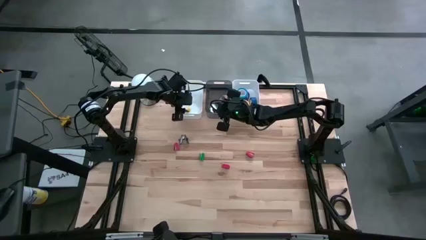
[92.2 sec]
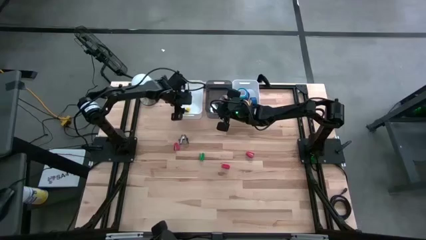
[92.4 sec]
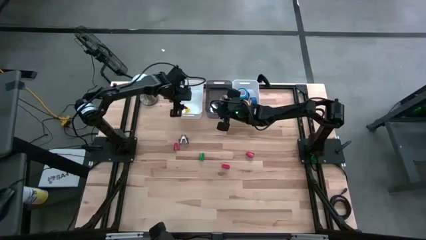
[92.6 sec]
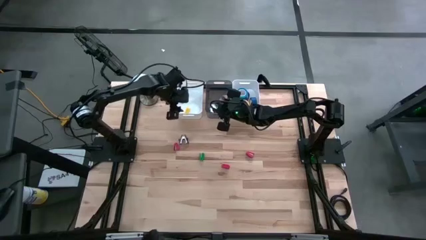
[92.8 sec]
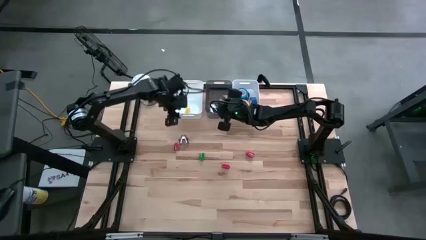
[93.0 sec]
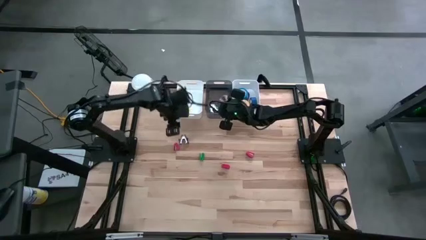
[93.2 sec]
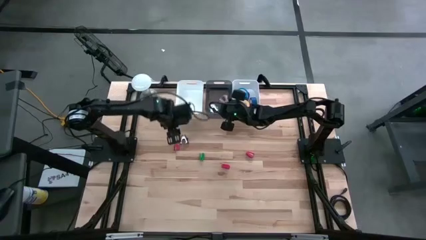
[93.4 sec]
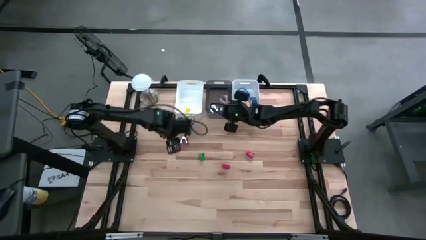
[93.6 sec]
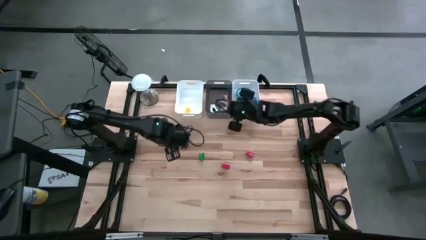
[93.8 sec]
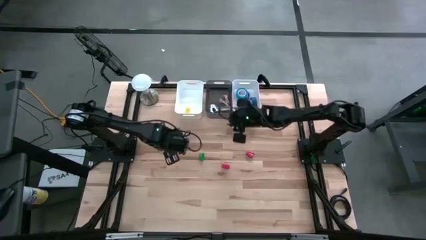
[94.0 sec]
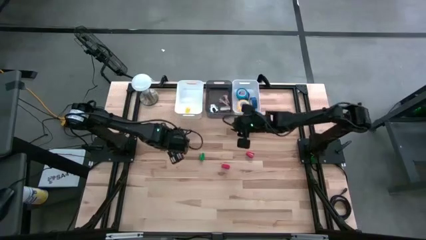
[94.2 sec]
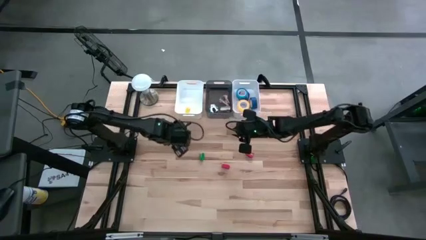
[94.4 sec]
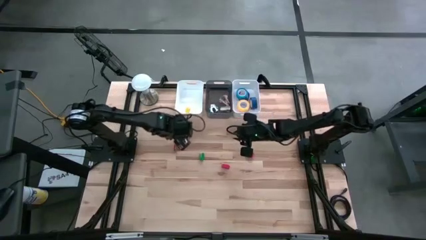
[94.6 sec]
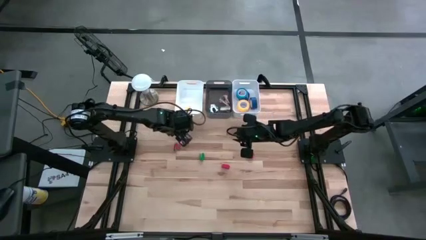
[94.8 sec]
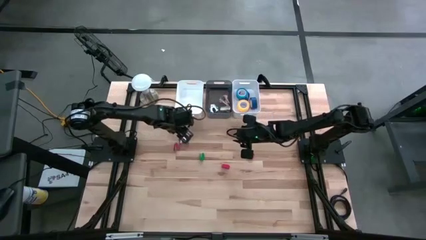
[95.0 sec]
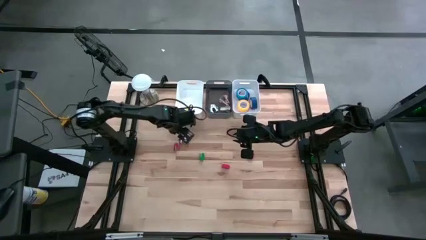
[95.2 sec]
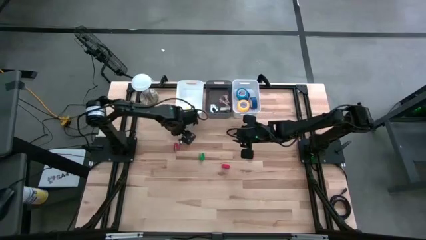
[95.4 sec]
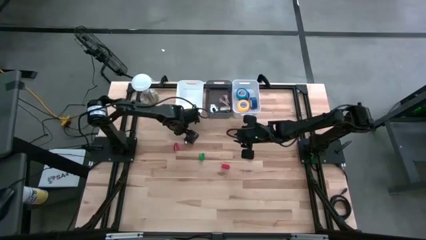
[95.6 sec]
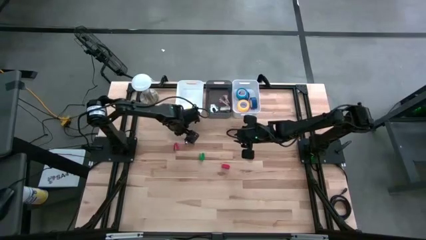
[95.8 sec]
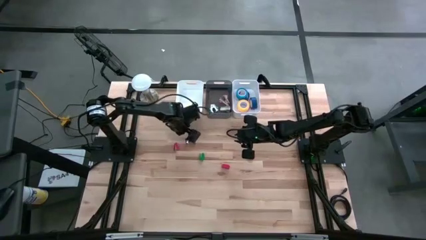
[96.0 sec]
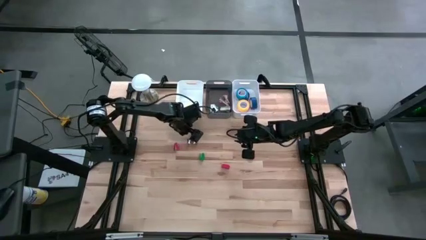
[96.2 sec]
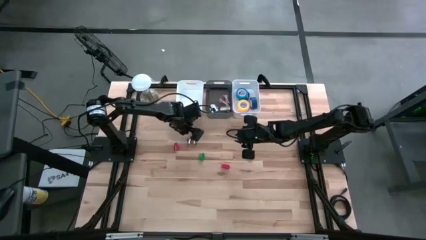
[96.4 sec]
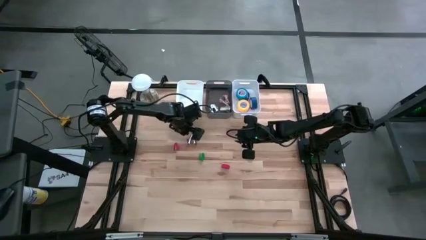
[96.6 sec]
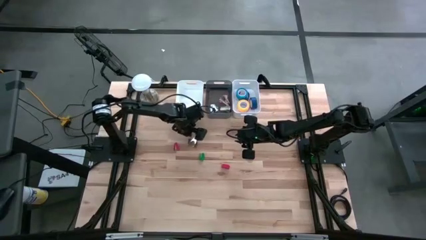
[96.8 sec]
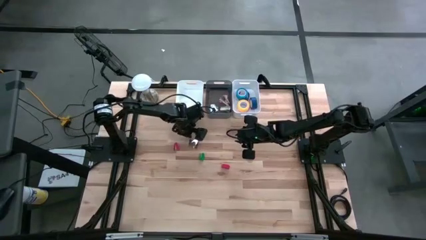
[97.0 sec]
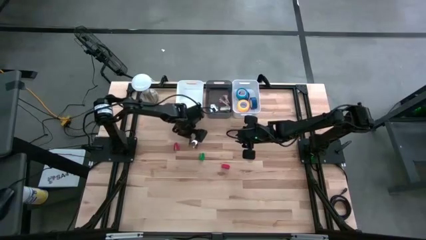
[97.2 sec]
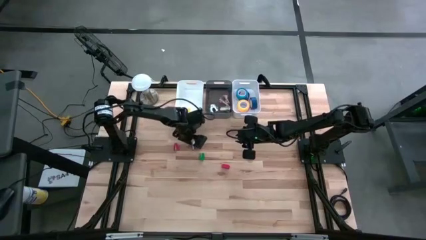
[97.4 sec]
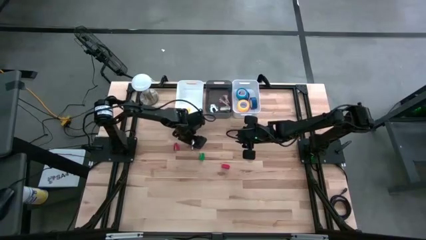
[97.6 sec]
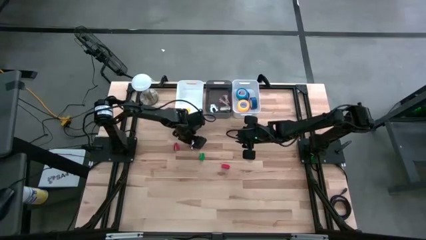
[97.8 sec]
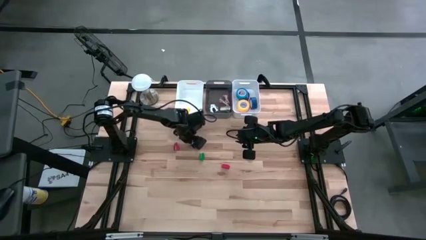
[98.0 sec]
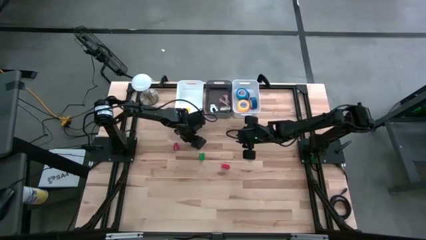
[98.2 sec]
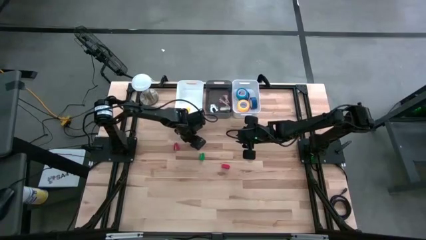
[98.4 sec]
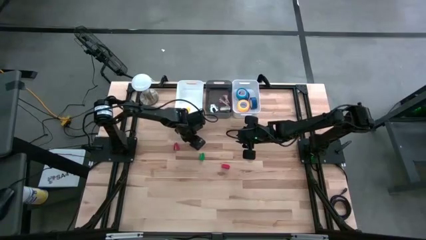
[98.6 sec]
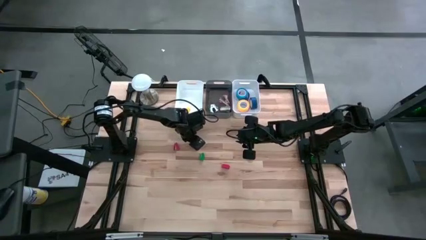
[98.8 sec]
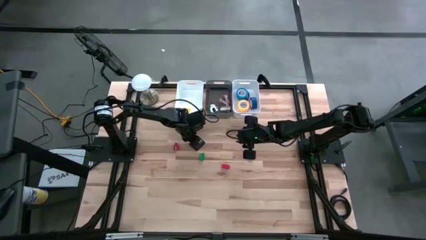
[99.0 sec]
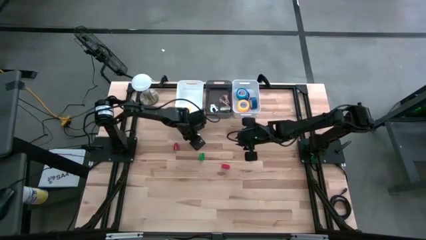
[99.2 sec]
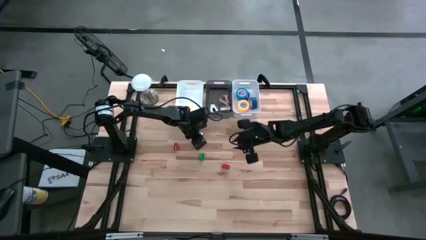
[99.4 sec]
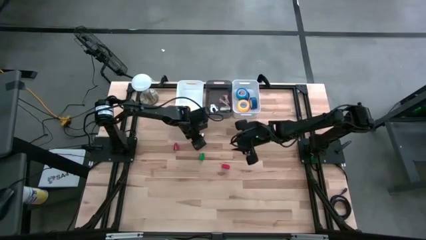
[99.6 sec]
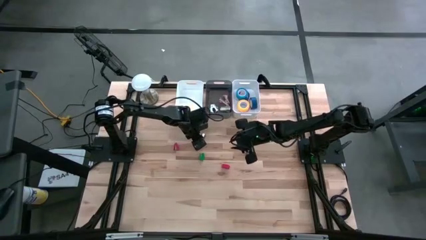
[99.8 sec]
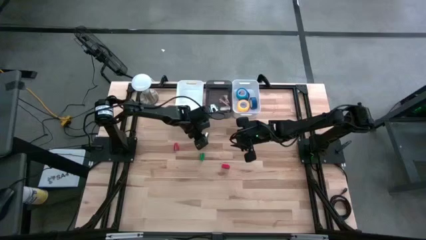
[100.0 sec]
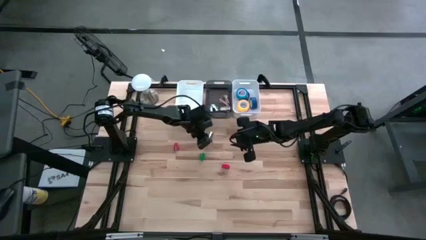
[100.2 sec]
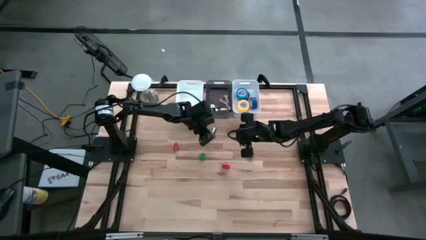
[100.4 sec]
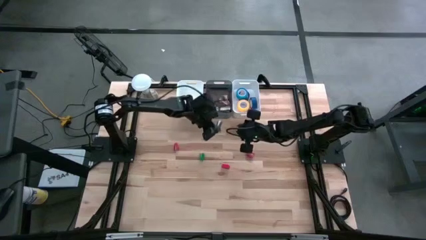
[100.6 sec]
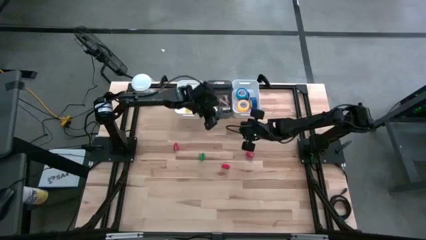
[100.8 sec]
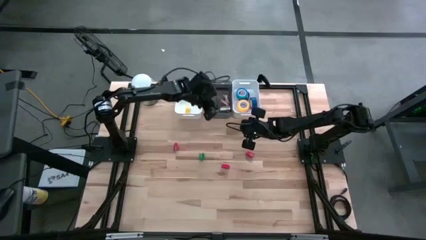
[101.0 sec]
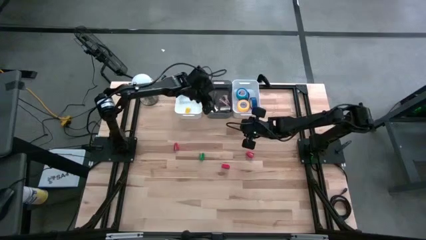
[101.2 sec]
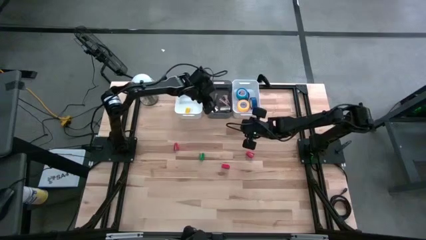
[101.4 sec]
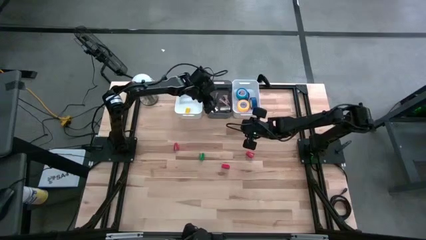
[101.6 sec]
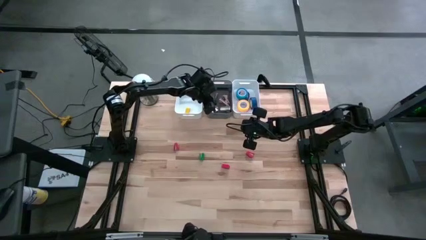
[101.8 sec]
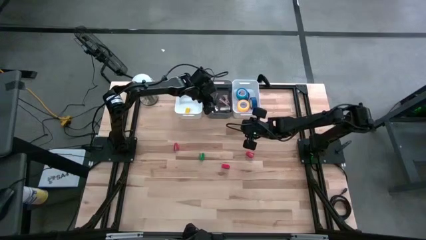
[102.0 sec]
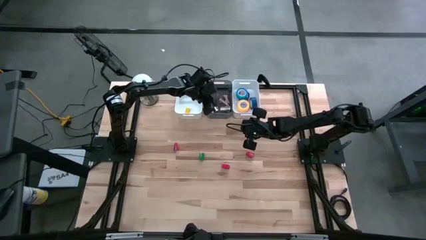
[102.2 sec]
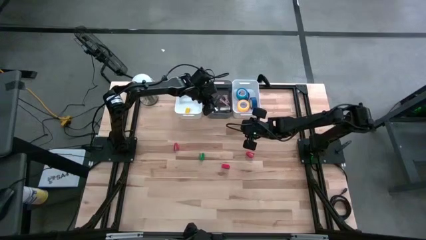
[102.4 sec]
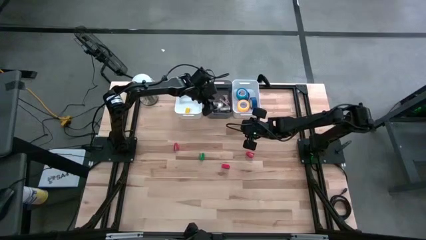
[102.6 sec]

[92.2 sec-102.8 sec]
Task: Pick and place Stapler, Stapler remover, tape
Put the blue staple remover into the black bin

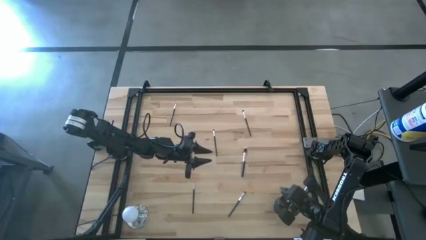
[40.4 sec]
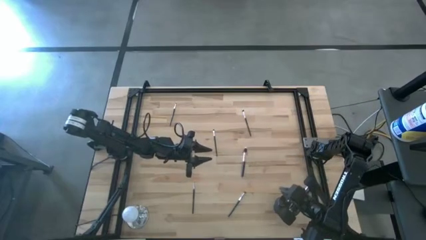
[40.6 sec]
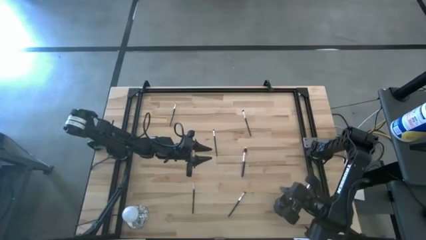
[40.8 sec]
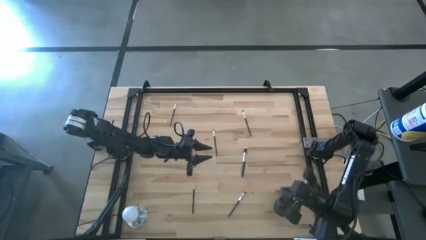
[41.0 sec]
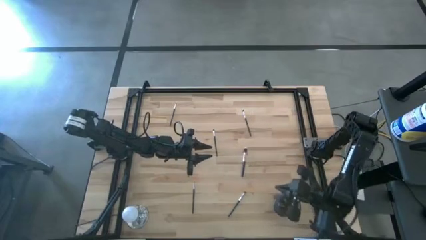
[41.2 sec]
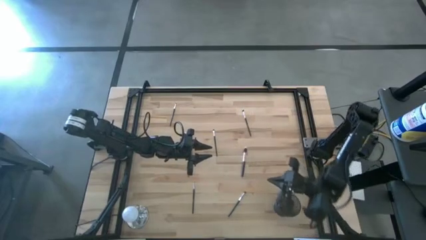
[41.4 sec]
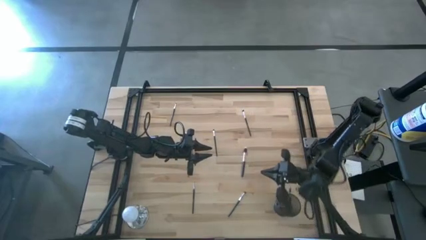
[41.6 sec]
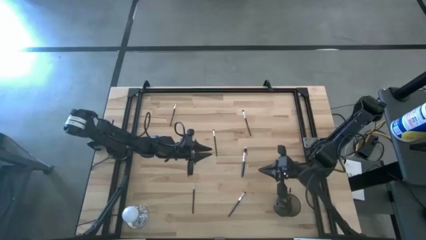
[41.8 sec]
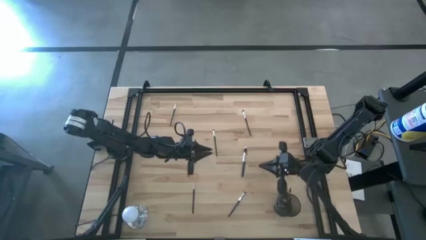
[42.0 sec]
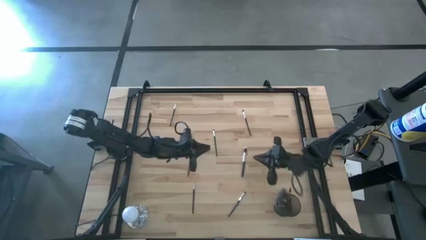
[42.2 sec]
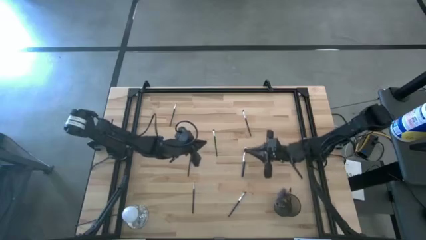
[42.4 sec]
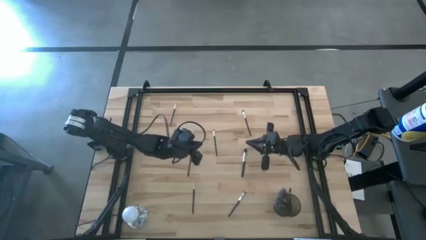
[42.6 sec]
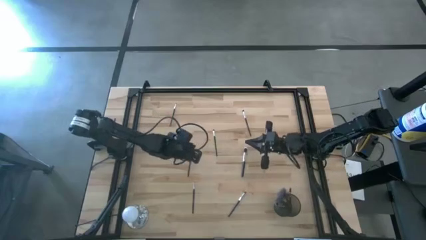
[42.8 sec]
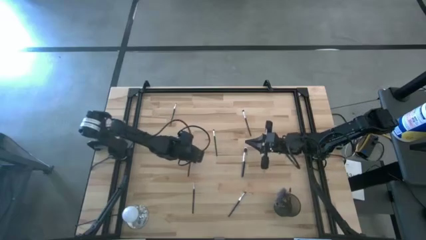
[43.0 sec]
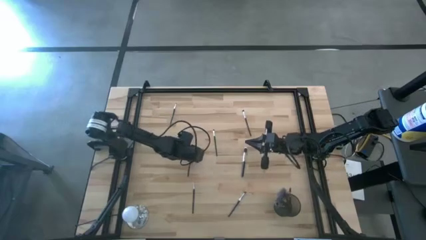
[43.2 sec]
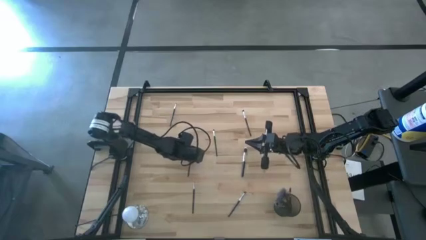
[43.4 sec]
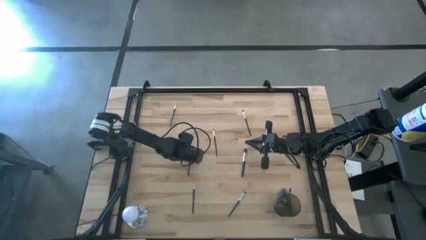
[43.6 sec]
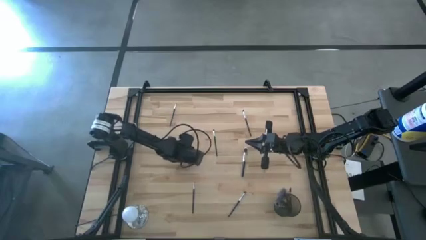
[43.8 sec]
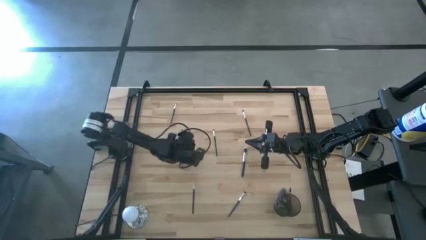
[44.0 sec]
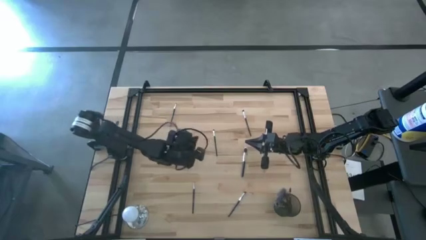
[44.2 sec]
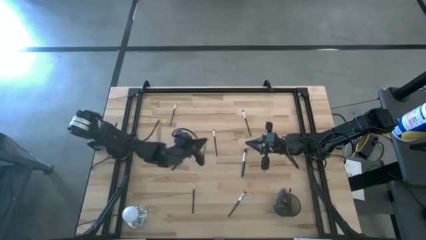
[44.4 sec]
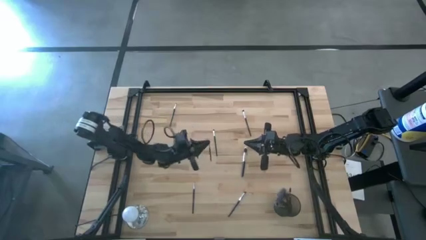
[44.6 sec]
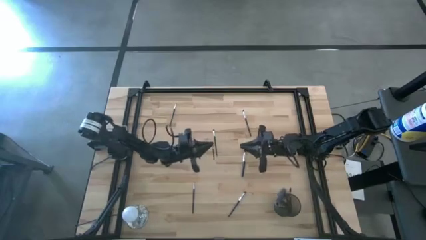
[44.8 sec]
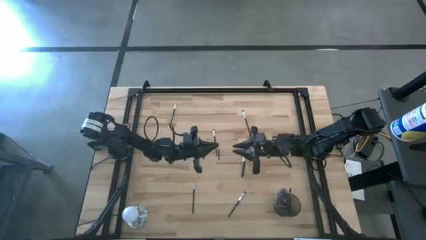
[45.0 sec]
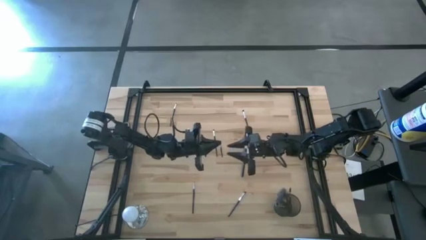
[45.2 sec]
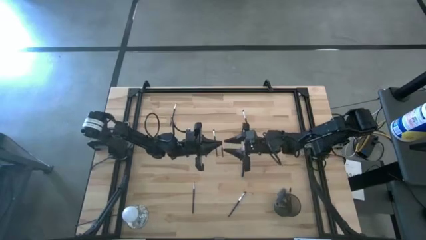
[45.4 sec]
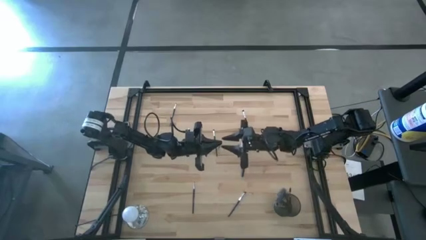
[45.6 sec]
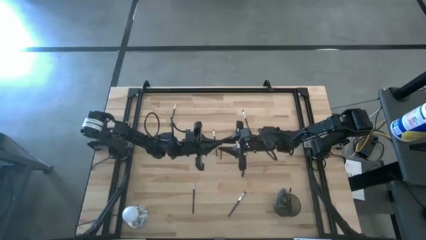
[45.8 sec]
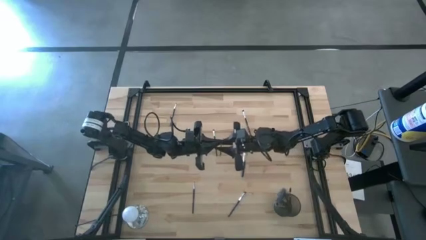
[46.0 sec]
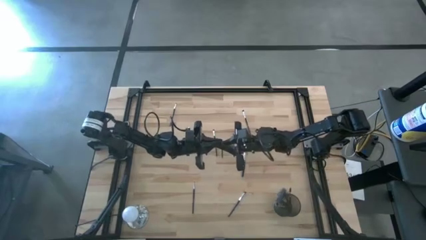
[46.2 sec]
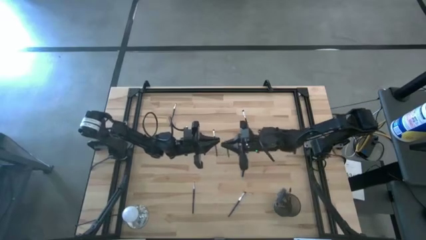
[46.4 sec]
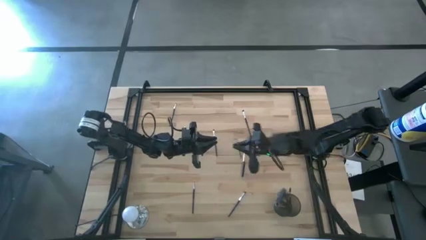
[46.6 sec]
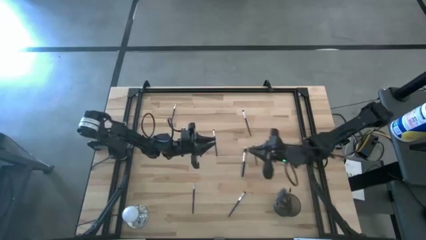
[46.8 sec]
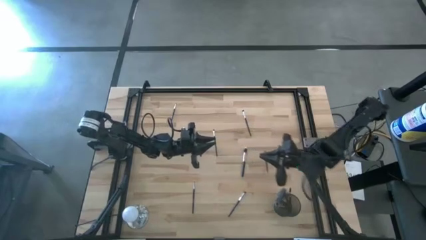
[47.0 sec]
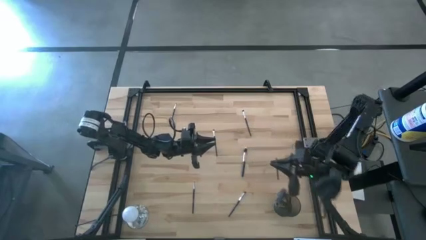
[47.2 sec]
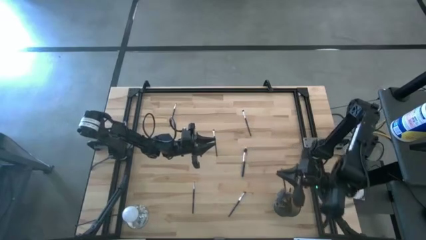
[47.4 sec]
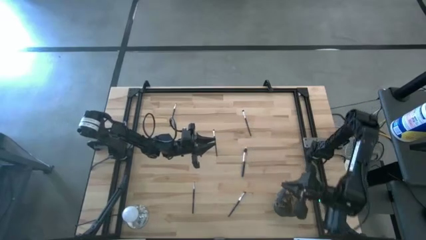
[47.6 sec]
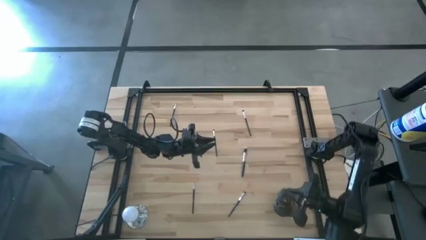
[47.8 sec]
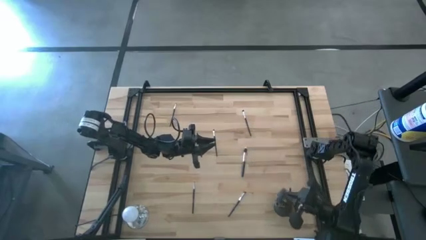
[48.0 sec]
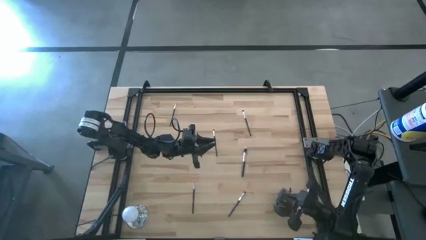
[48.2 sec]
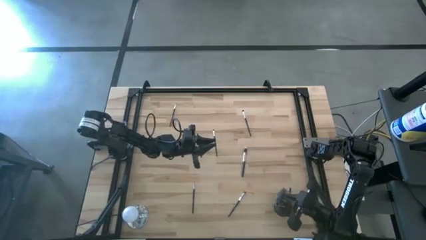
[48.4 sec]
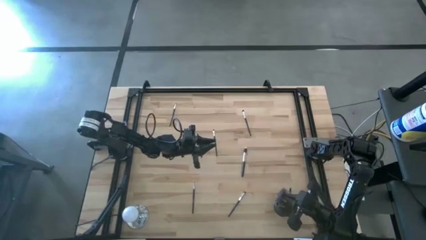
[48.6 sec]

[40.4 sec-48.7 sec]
Task: Sort items
Put the eyeshadow brush into the wire basket
